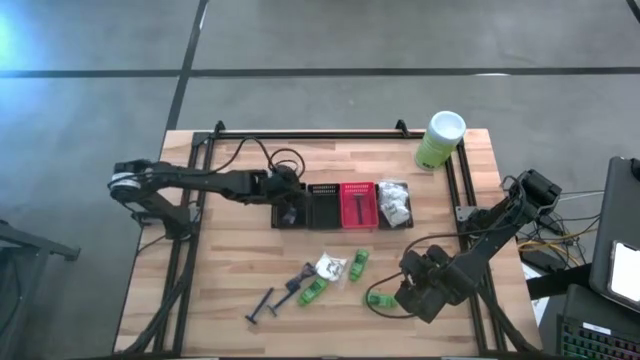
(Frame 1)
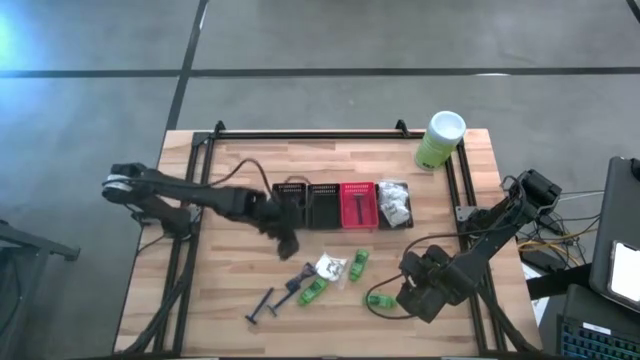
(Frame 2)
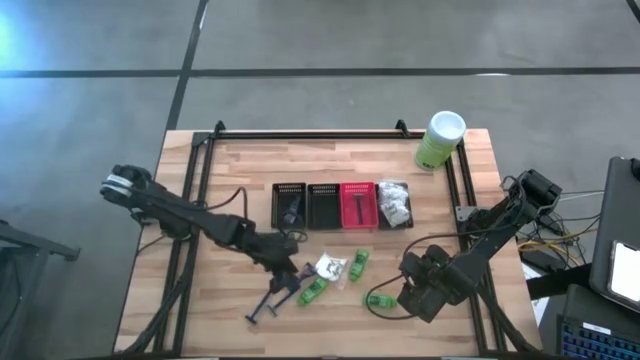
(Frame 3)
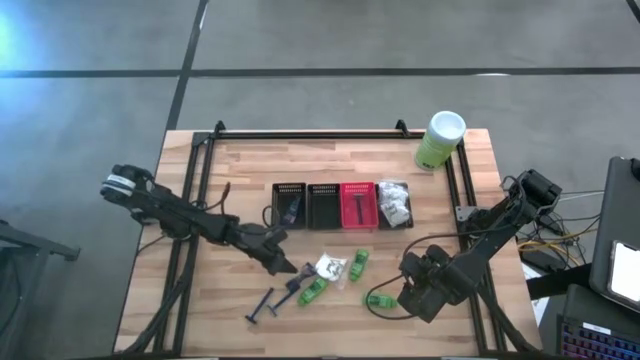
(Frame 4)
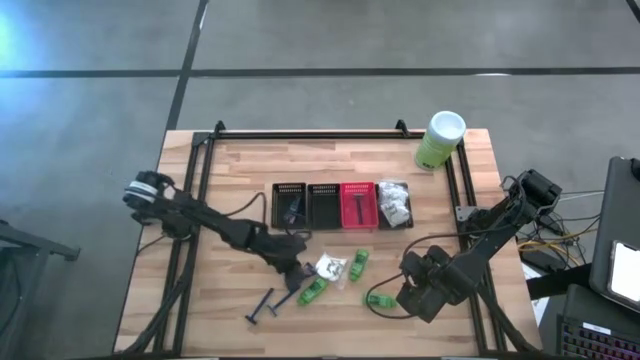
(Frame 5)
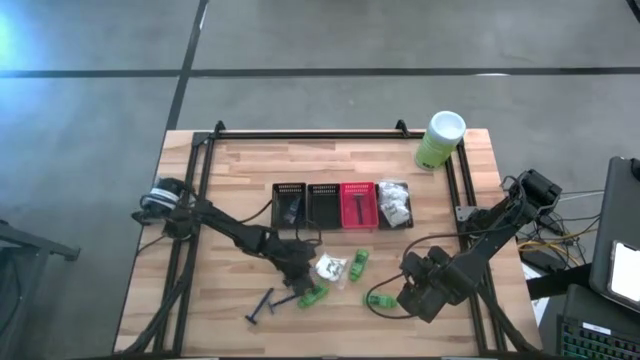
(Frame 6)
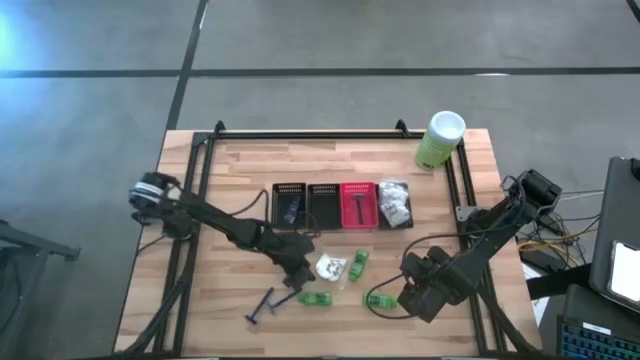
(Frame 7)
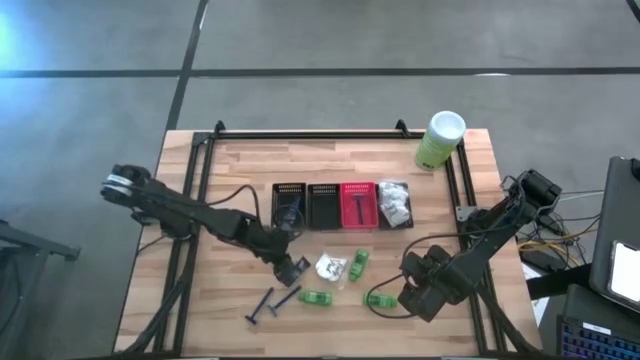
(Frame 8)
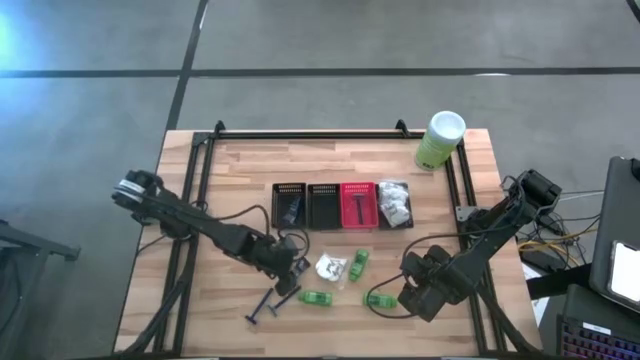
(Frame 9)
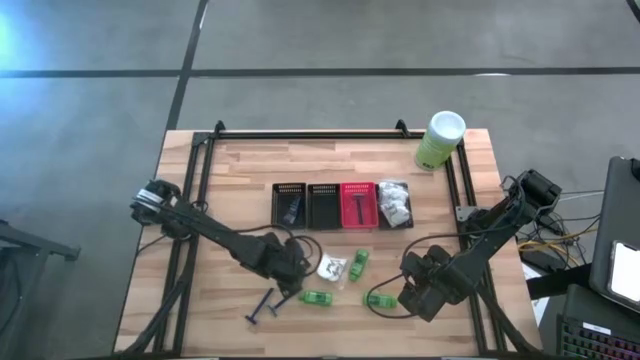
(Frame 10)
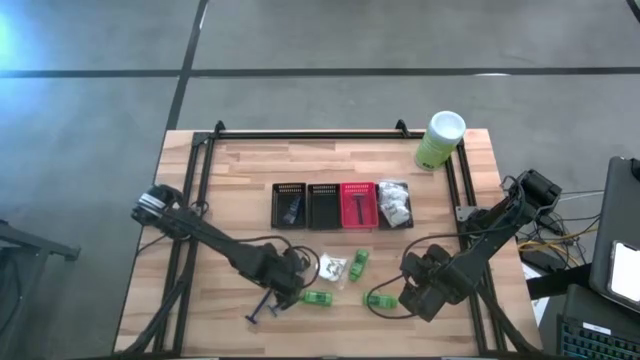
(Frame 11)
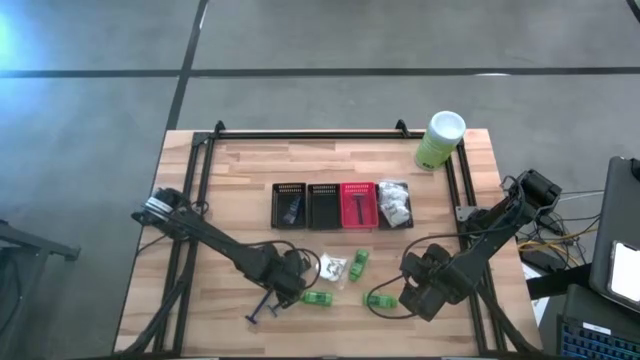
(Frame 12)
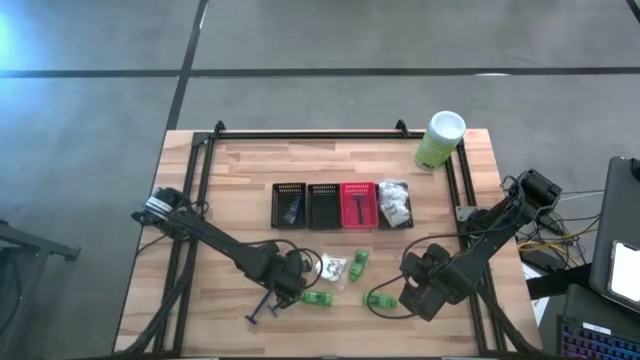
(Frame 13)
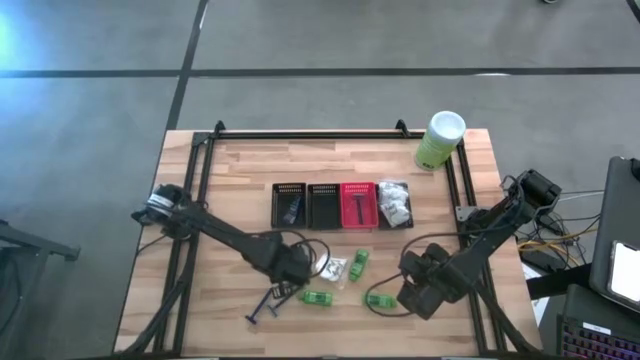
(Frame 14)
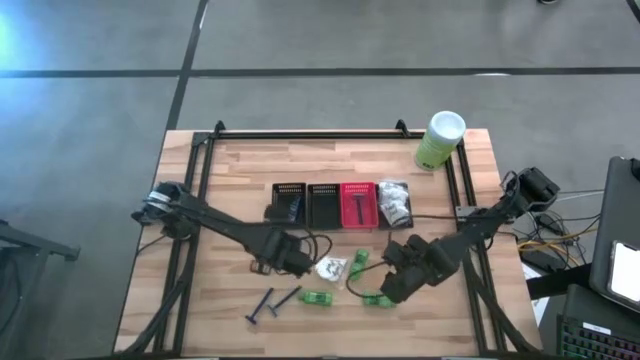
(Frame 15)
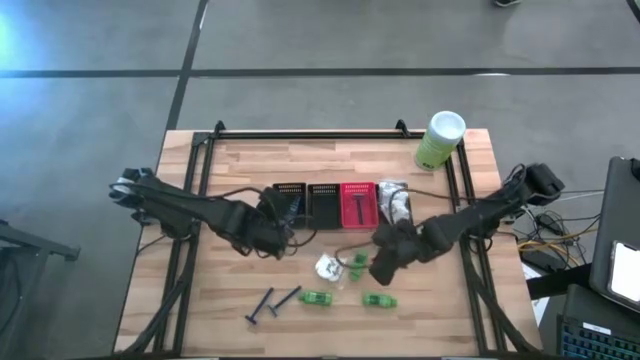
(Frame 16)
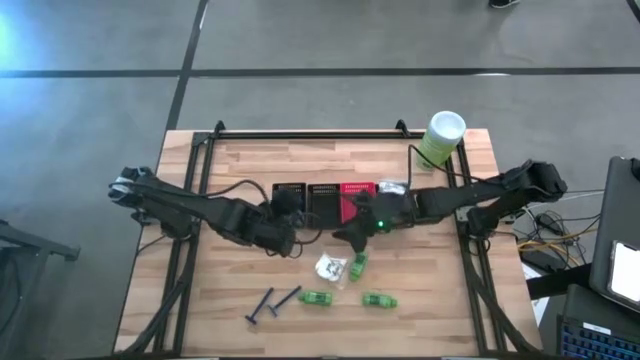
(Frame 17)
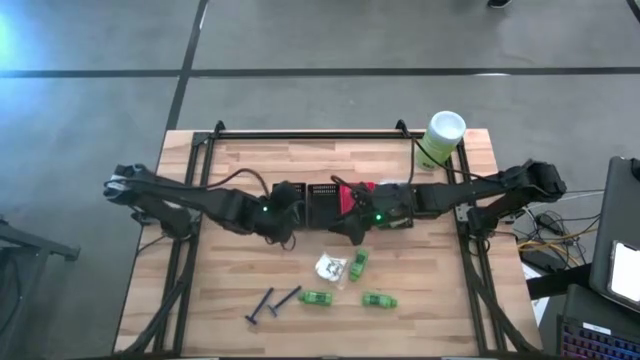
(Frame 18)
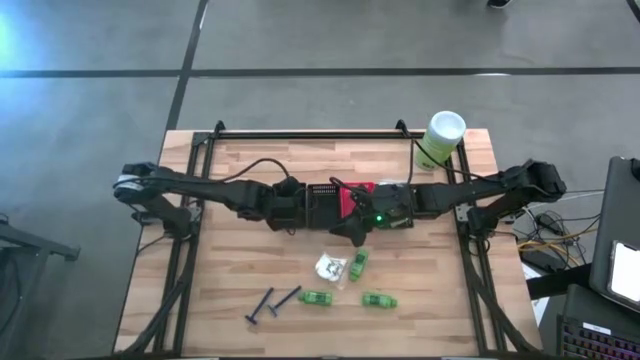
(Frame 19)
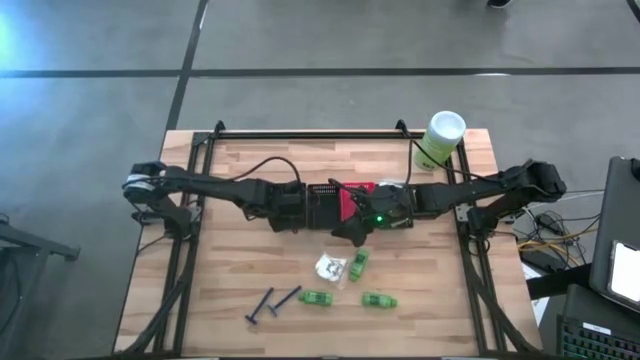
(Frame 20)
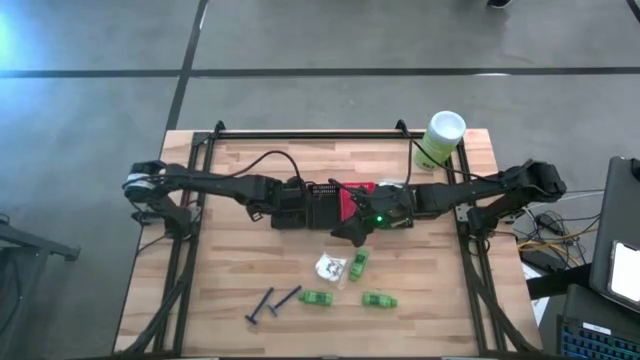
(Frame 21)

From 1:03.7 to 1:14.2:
Task: Pick & Place Travel size toiletries
Put the blue shave cream into the left black basket

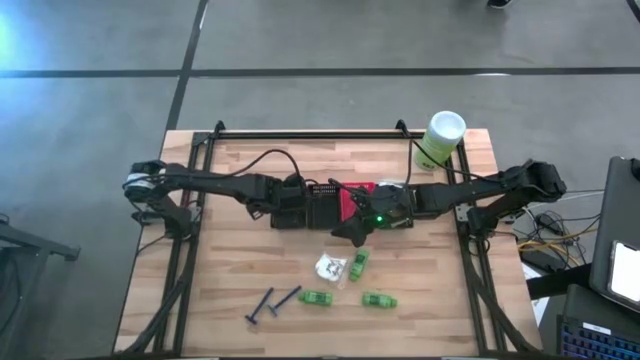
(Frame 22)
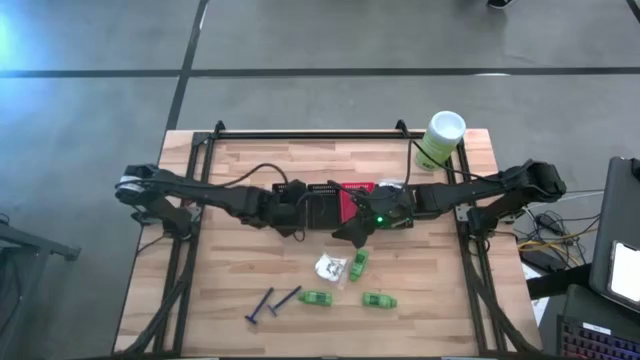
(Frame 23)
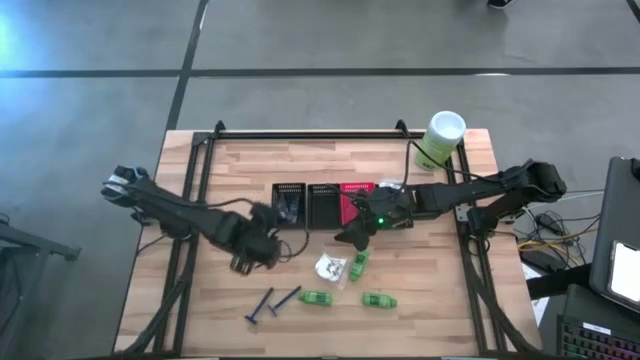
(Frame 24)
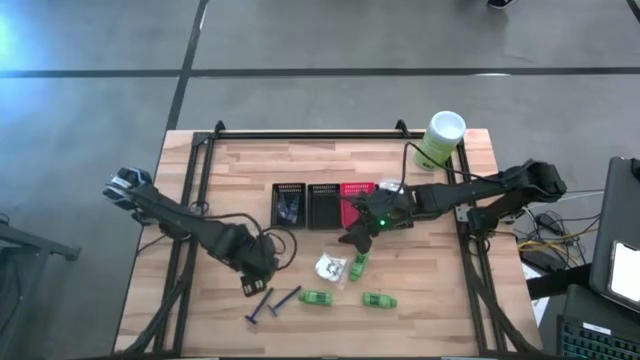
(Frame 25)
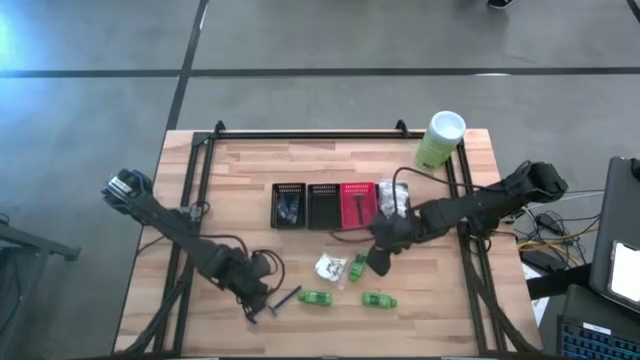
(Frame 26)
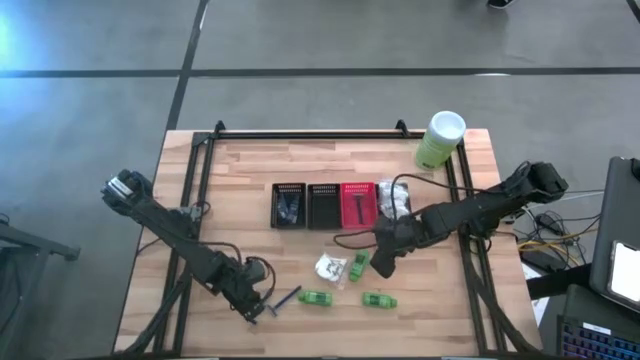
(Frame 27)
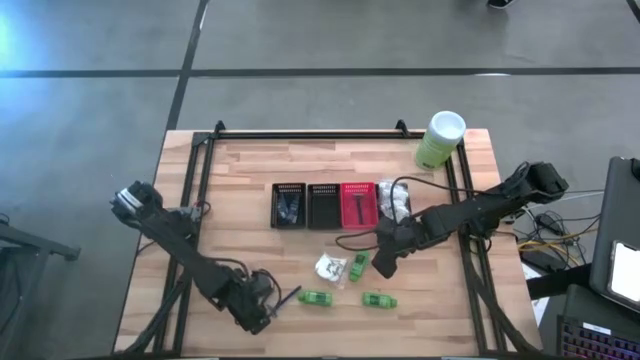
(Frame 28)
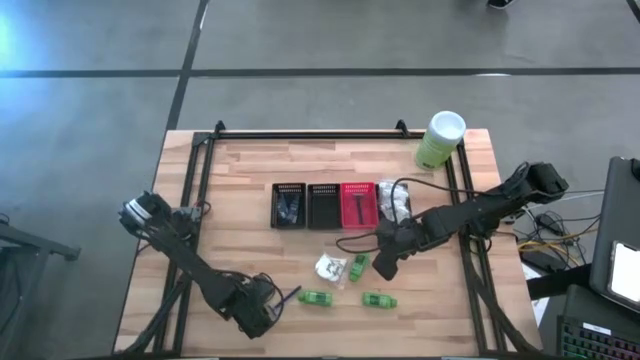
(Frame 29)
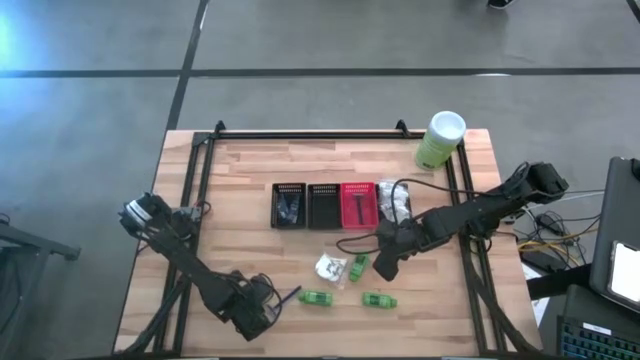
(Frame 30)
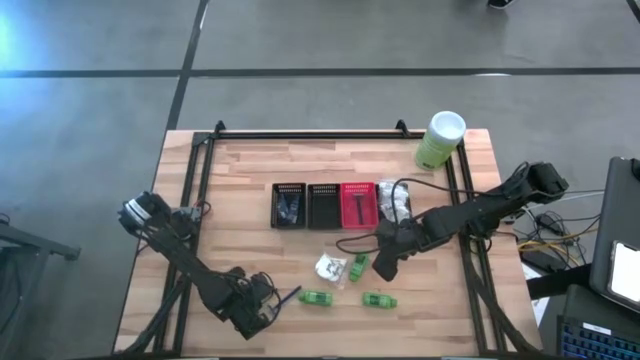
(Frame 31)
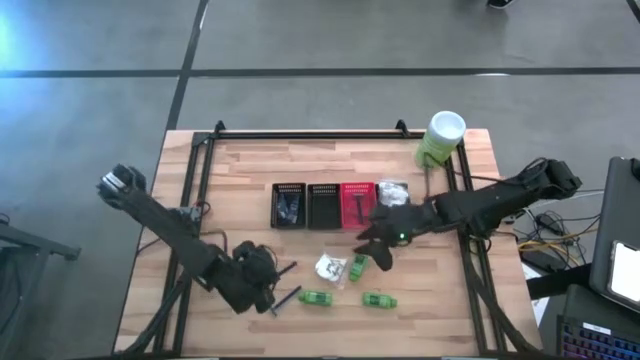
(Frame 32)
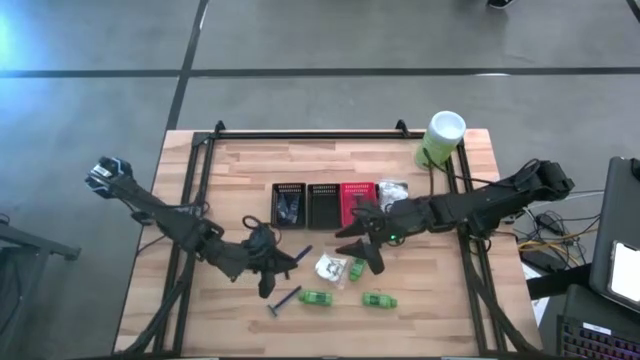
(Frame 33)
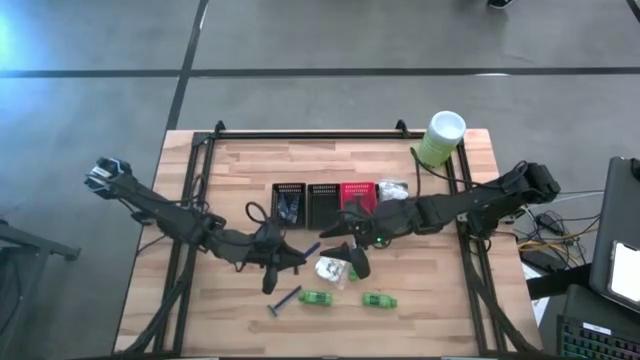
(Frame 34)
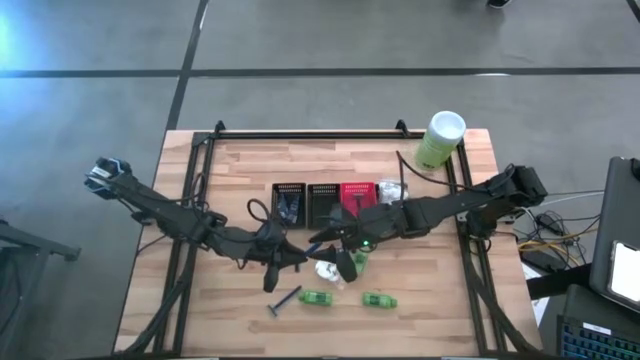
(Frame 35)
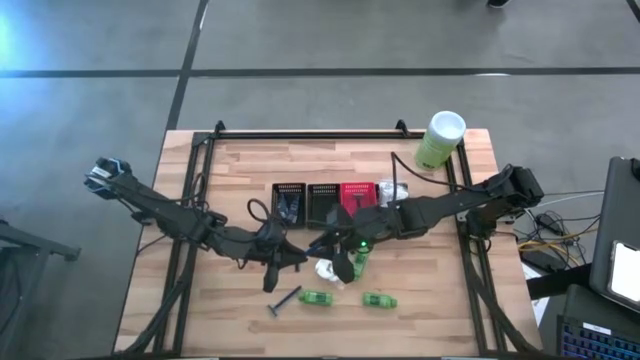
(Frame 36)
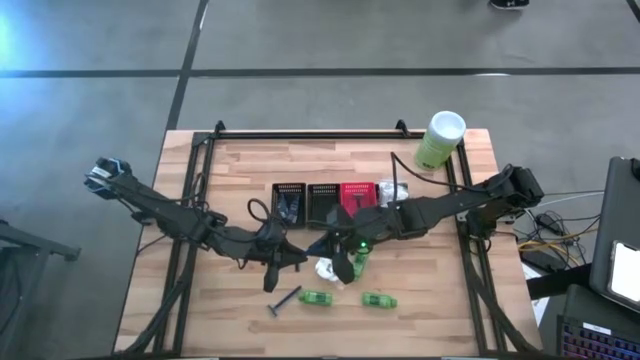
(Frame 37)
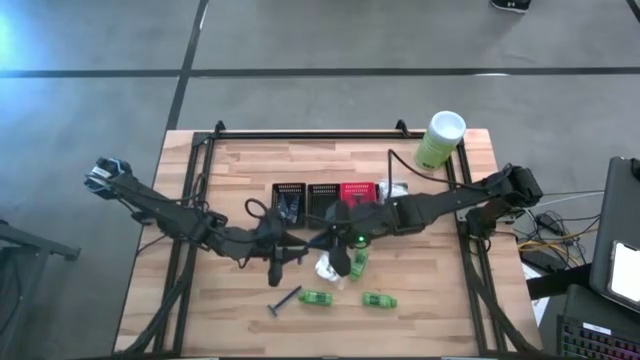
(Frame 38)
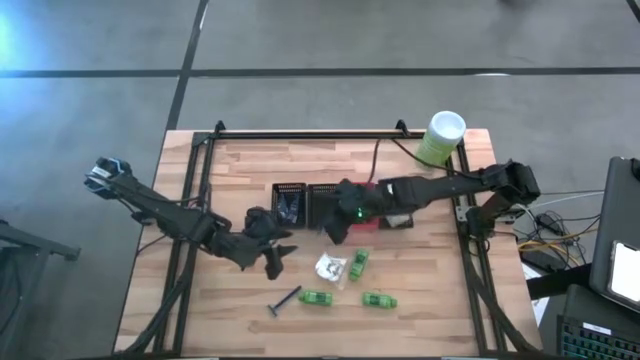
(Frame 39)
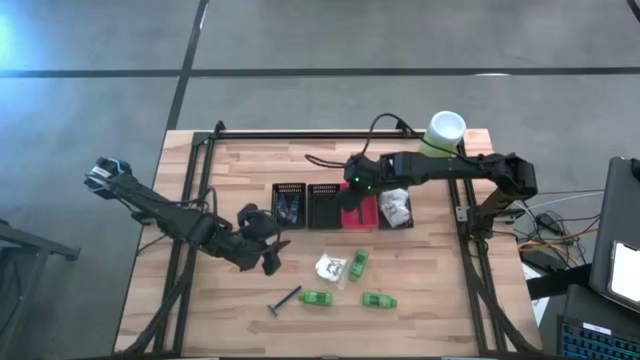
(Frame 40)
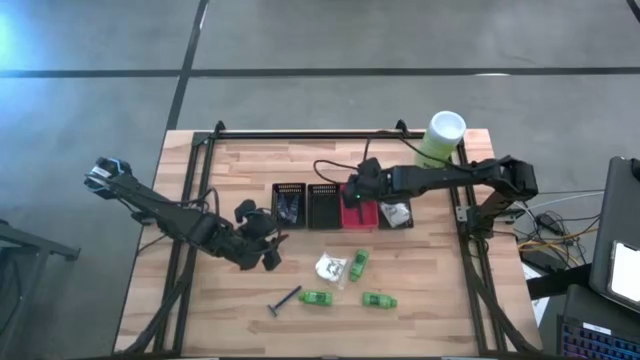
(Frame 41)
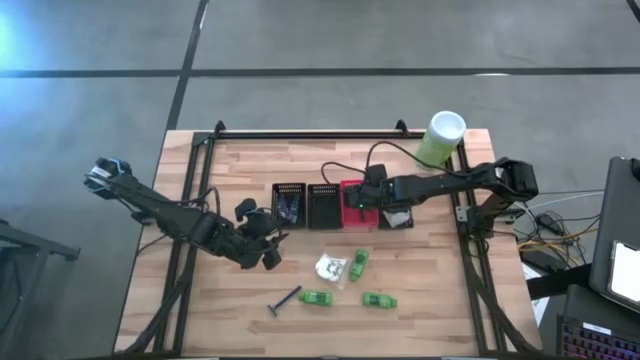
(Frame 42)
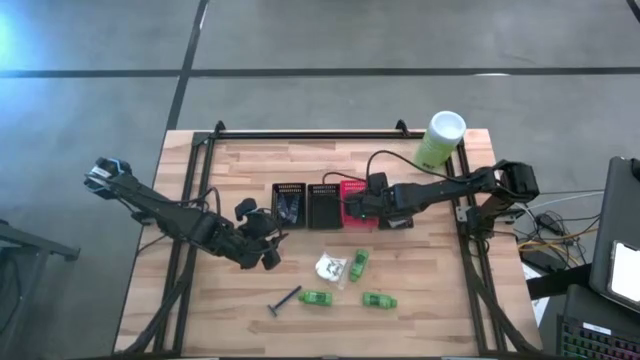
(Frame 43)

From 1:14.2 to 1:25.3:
Put the blue razor into the orange basket
